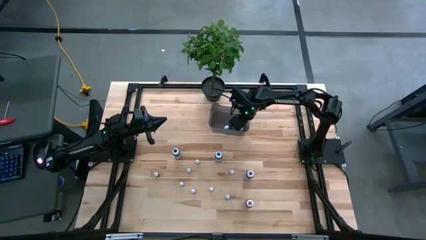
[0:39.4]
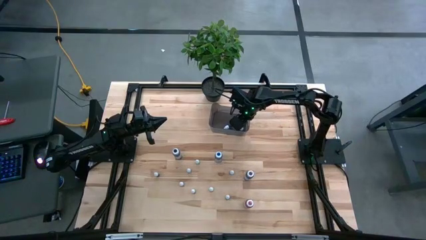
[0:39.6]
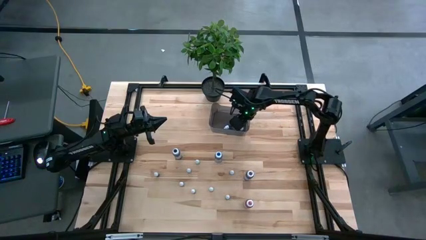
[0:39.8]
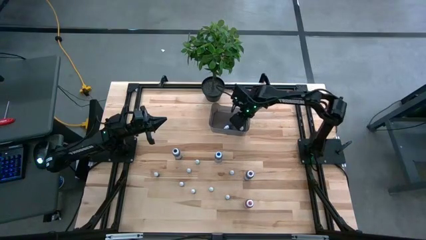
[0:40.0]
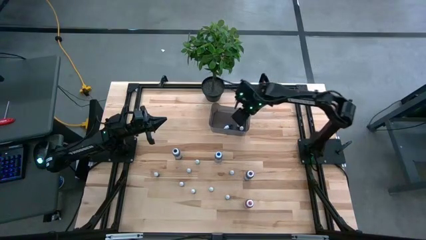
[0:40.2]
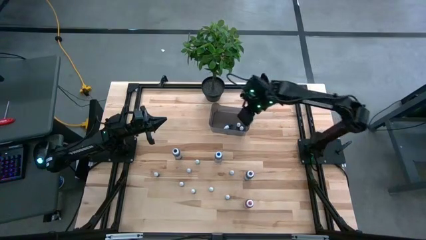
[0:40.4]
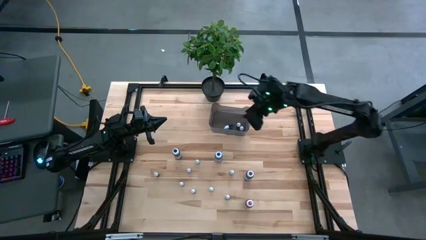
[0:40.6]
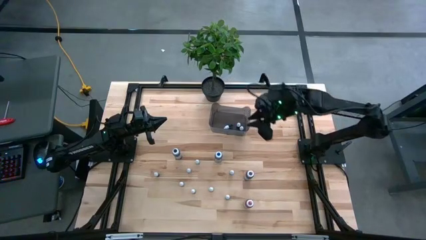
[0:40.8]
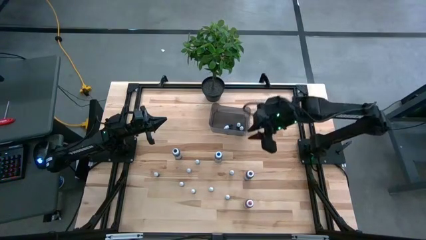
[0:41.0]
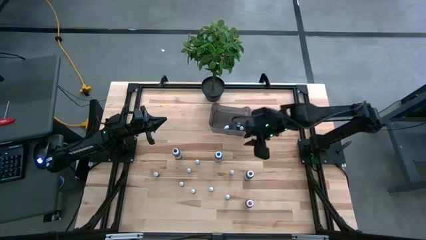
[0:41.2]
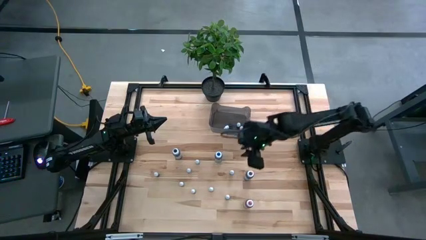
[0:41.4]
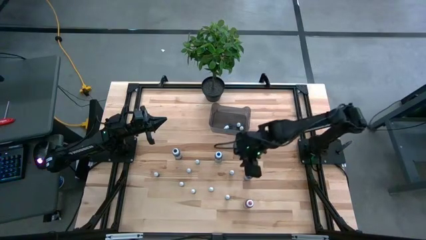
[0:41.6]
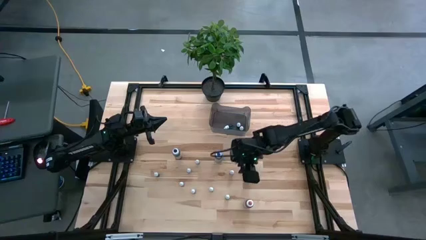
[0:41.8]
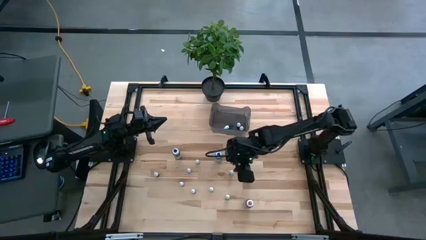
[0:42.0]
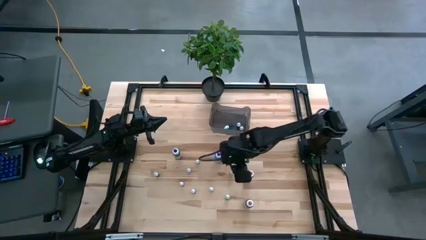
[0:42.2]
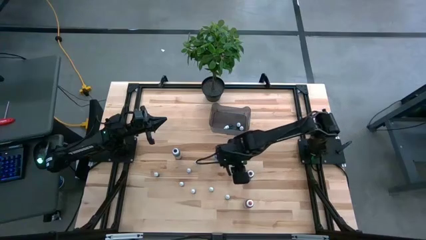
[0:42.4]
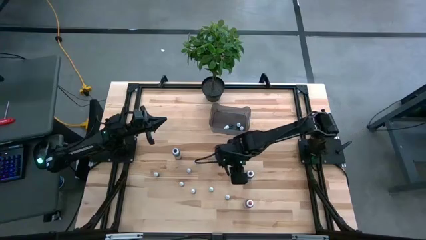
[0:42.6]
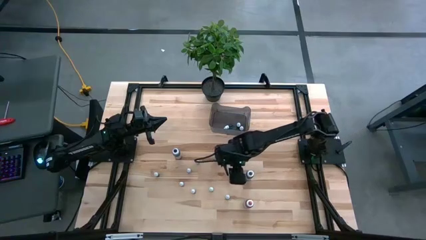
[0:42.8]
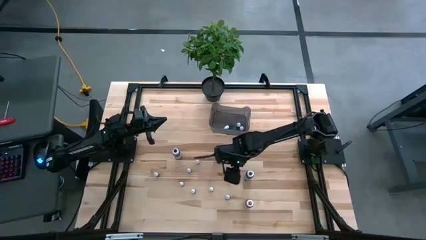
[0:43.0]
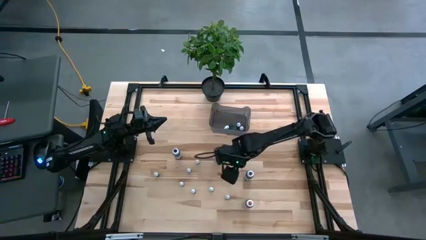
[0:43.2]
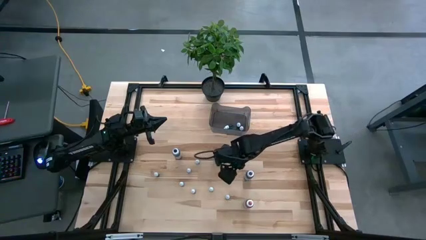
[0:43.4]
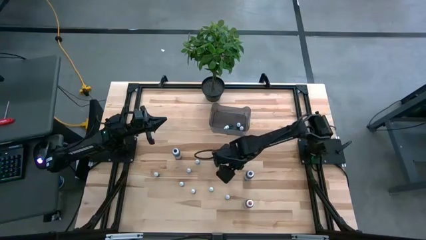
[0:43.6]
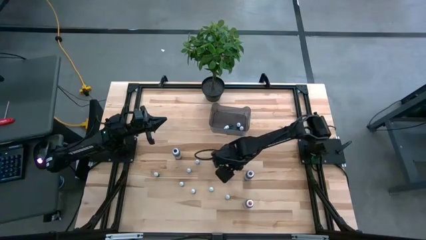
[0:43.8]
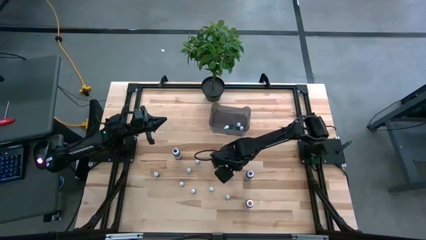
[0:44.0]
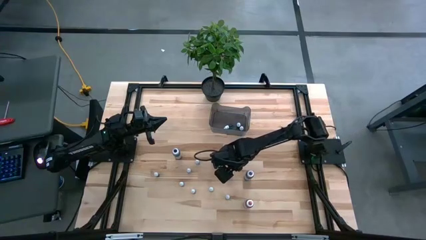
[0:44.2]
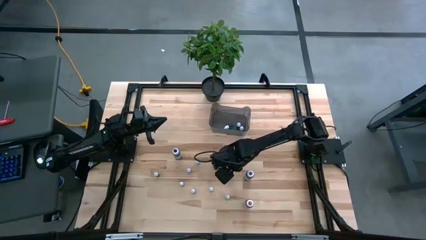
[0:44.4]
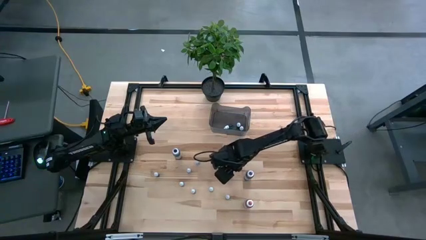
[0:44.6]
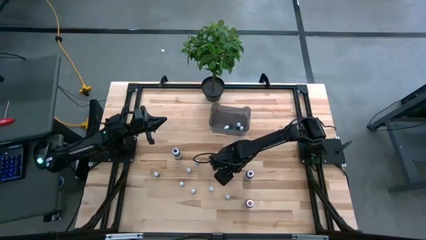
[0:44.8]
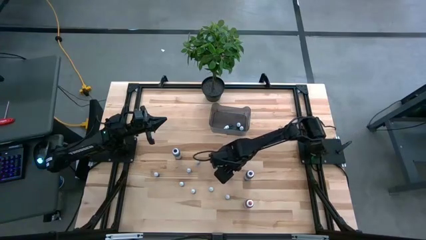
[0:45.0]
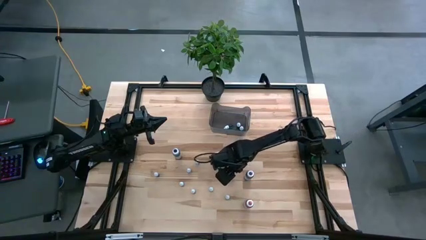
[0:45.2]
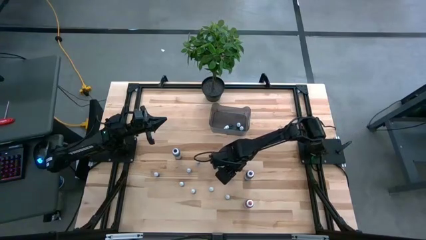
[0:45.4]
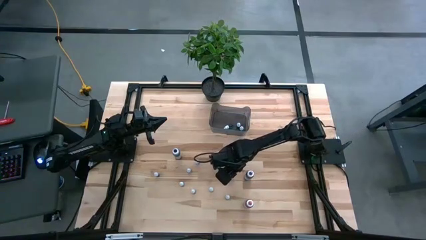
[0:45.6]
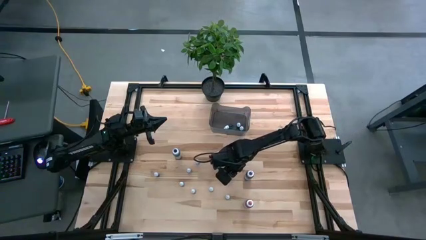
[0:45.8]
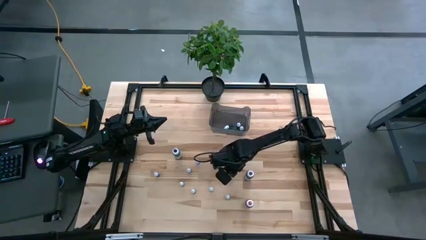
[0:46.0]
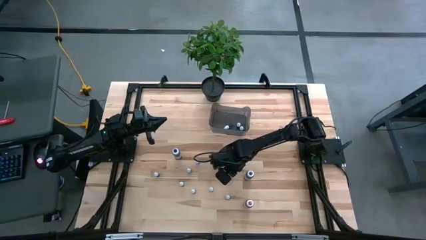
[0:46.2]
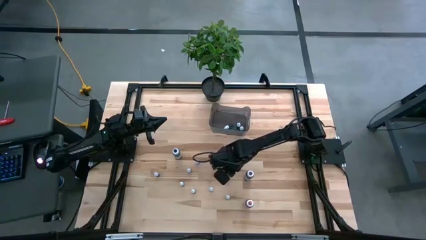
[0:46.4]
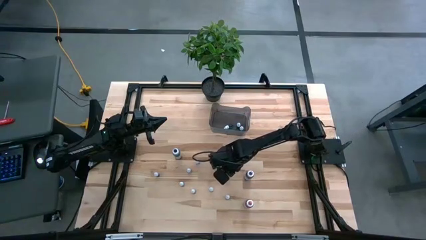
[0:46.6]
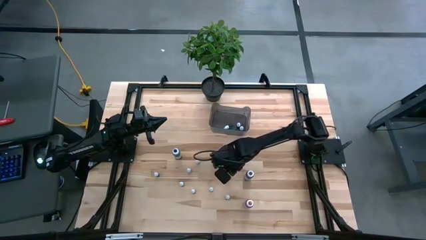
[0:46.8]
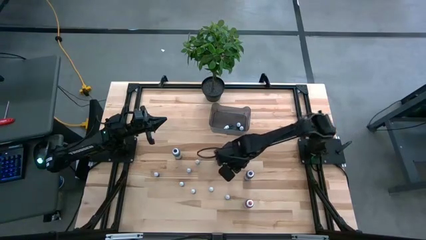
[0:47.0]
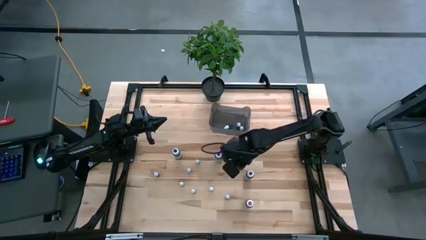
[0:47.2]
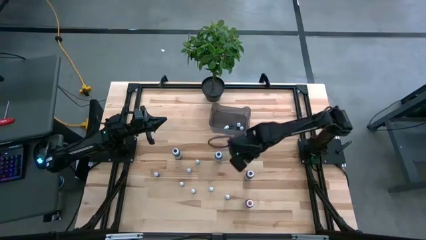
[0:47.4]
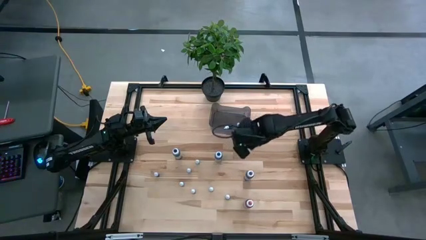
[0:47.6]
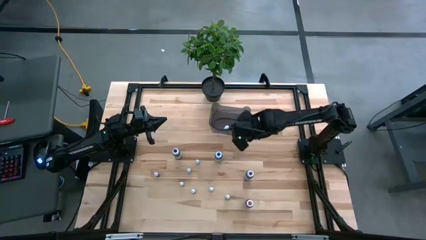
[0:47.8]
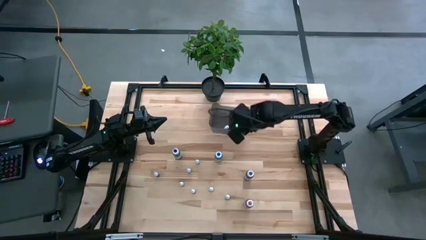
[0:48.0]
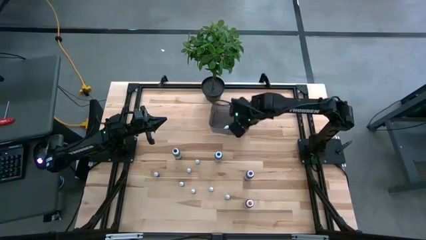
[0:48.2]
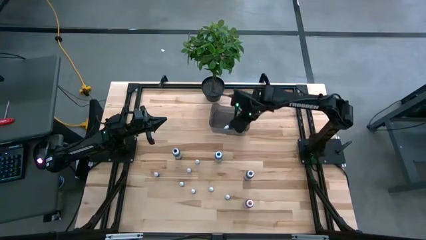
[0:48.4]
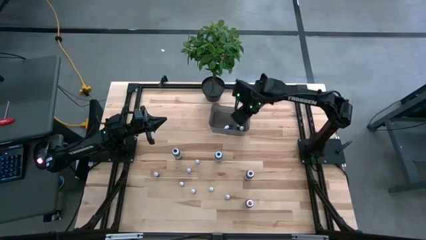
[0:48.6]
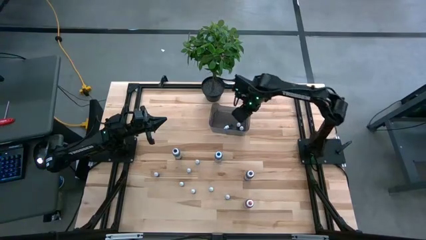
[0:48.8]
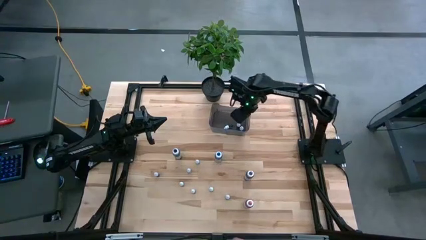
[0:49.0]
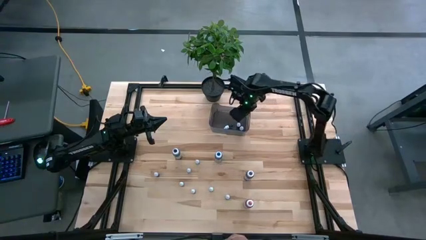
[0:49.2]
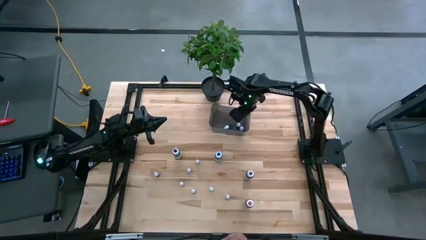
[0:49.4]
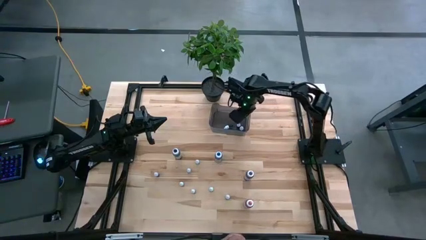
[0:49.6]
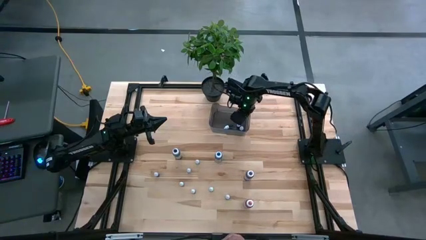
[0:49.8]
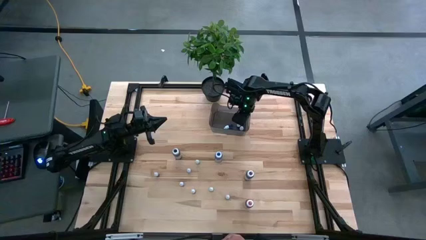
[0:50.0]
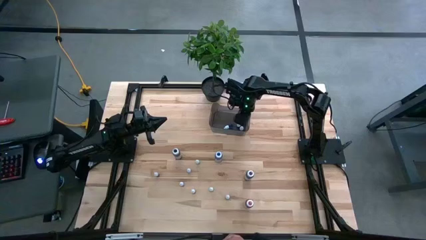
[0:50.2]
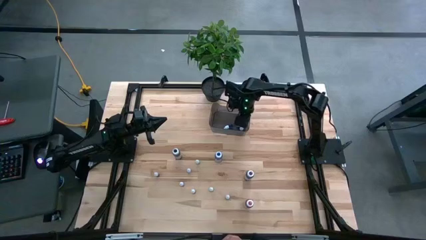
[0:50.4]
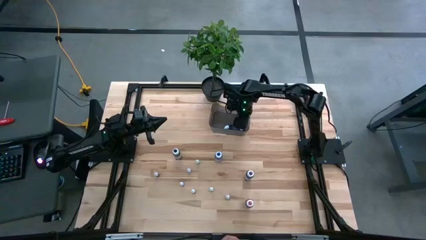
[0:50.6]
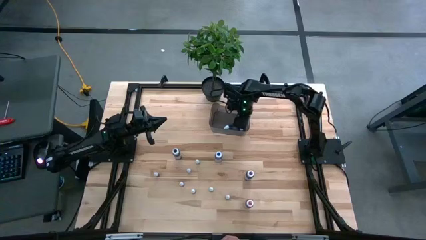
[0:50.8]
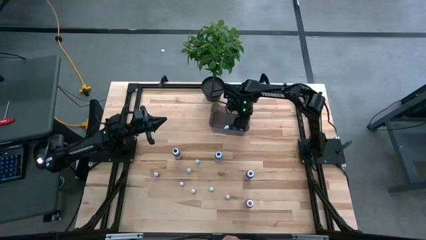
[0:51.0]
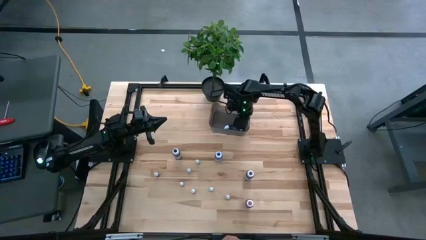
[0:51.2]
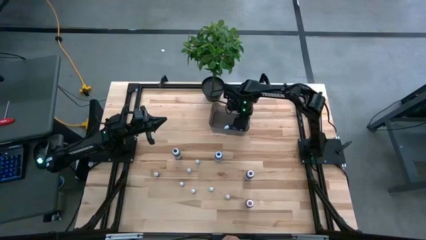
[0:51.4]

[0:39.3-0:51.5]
Task: Pick & Place food coloring
Put the small green food coloring bottle into the black bin

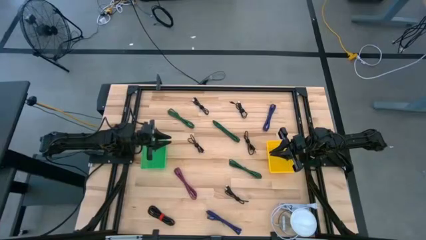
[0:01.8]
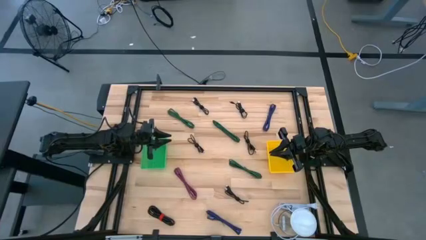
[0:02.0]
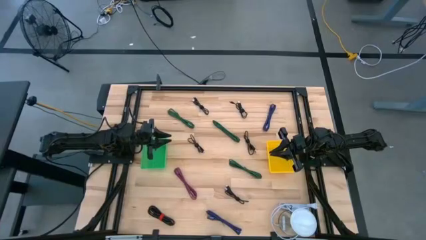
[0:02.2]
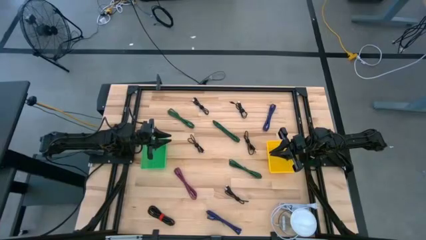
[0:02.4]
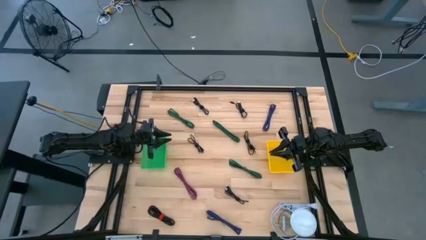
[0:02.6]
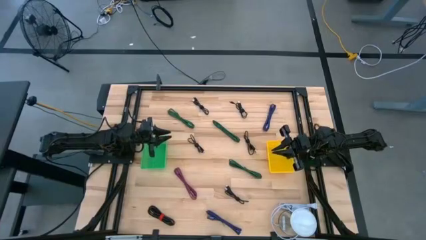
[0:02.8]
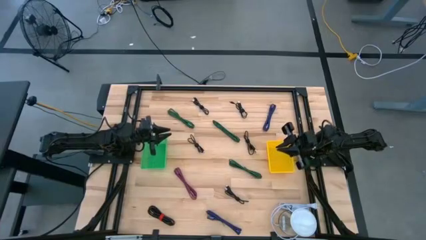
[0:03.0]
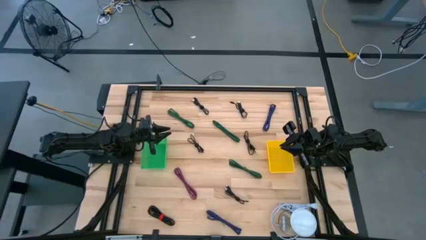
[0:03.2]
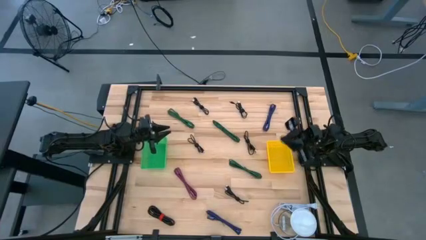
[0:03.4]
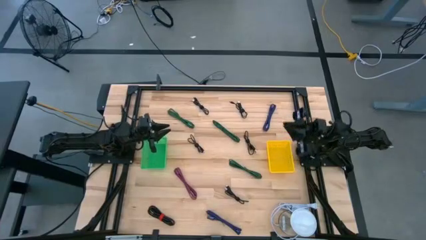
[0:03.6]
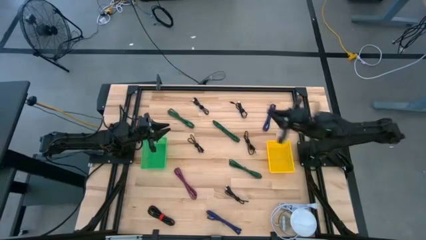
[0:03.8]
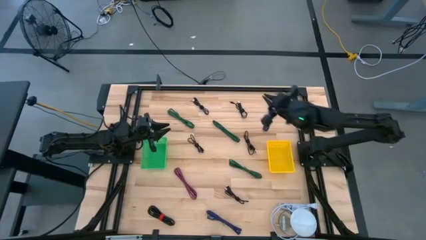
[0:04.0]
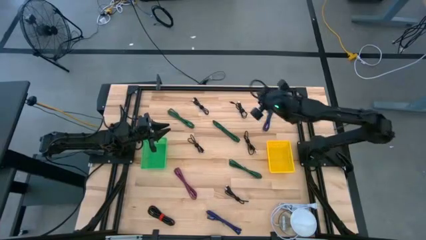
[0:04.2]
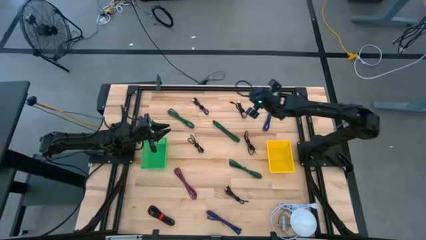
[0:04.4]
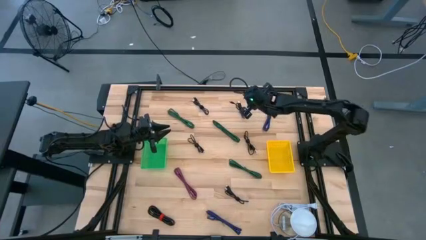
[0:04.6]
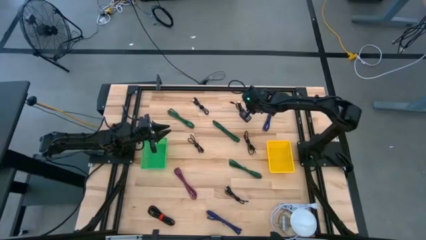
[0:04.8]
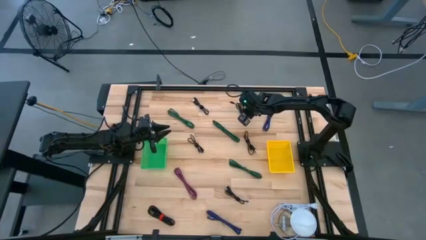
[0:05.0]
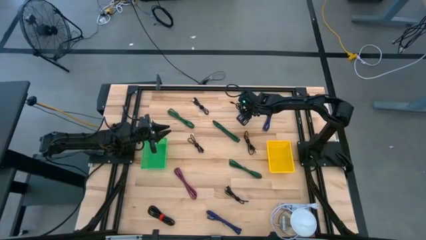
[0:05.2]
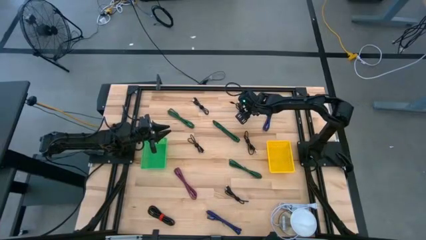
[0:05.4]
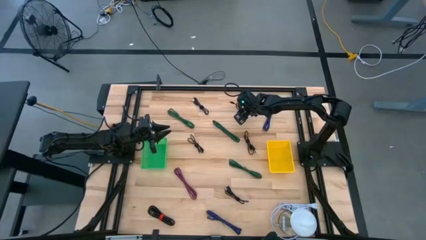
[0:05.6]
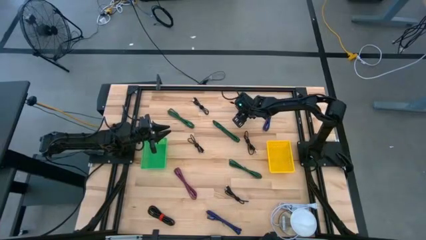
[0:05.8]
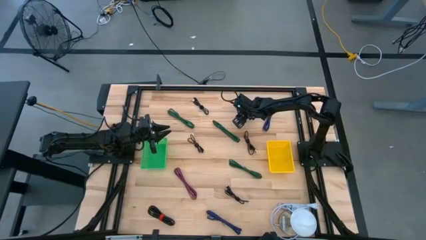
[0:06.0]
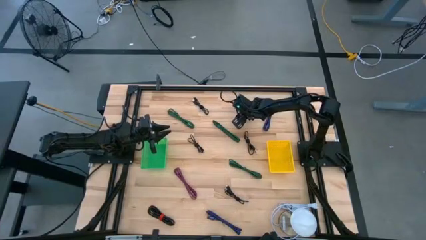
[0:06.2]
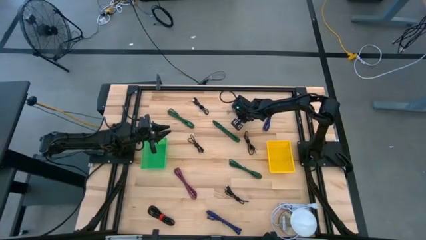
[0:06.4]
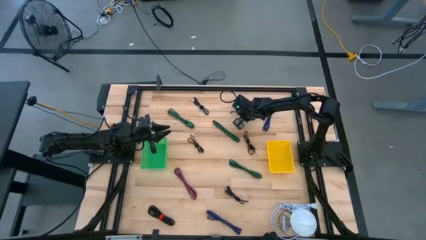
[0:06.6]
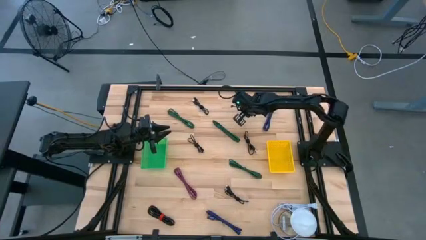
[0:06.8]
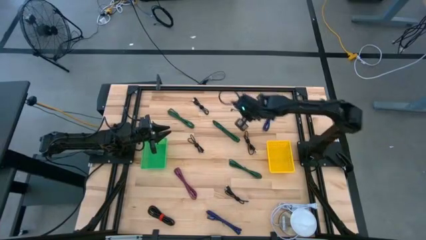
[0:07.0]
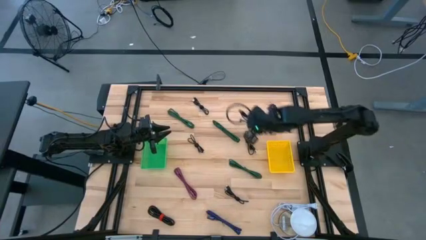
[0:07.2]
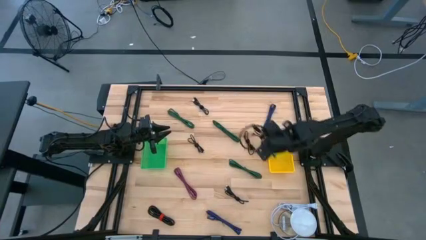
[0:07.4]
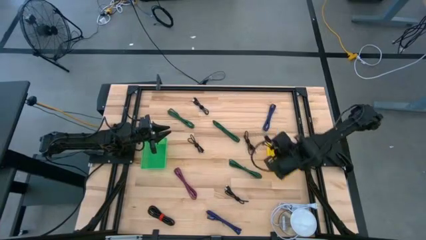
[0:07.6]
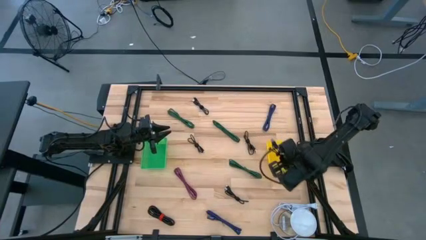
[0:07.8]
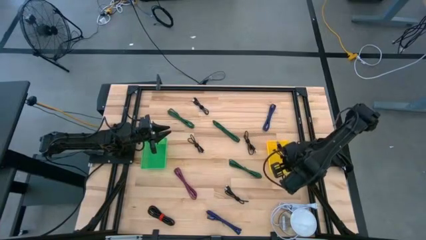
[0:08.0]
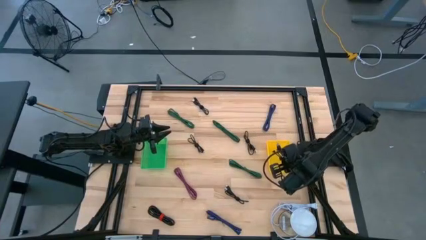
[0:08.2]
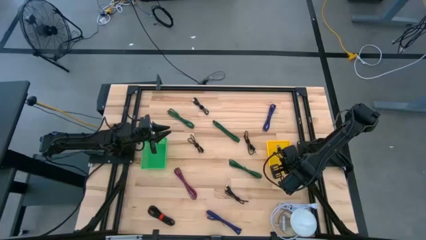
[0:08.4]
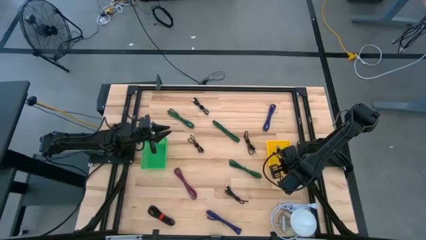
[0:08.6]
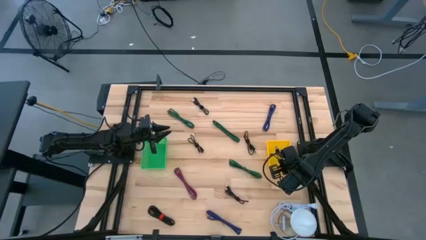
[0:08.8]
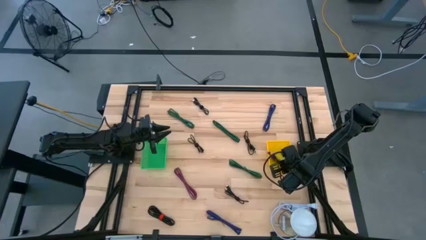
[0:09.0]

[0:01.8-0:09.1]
Task: Pick & Place USB Port
Put the black charger cable into the yellow bin
